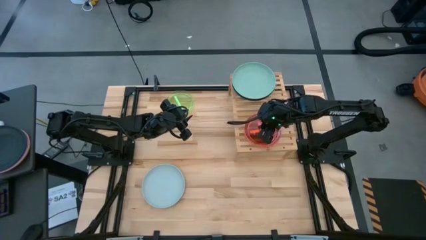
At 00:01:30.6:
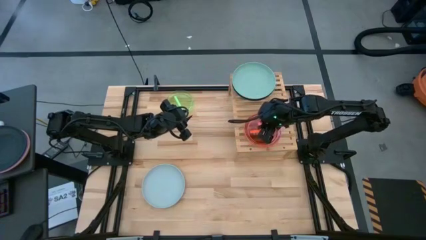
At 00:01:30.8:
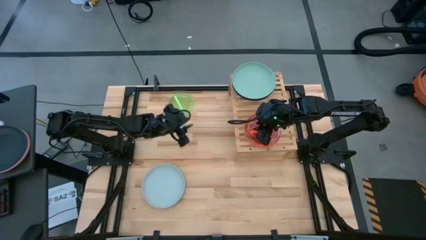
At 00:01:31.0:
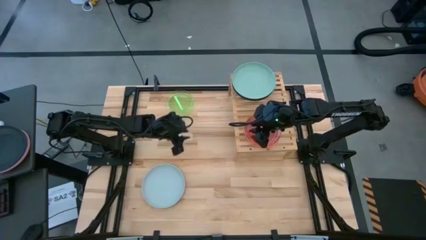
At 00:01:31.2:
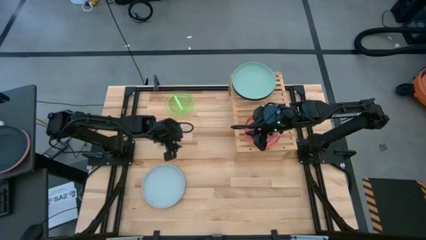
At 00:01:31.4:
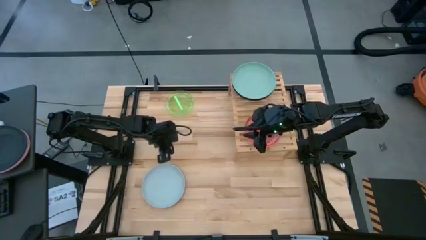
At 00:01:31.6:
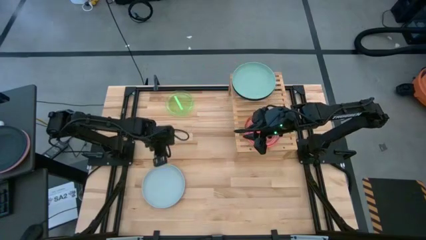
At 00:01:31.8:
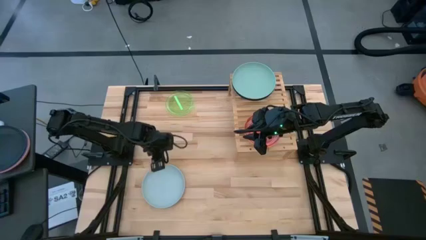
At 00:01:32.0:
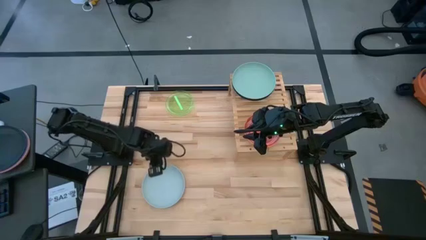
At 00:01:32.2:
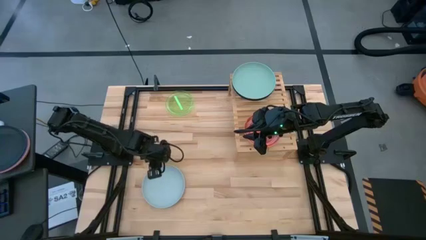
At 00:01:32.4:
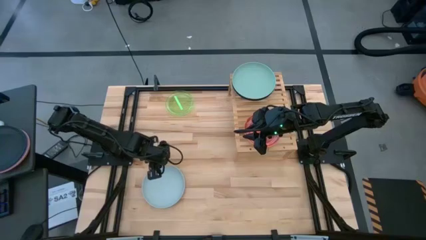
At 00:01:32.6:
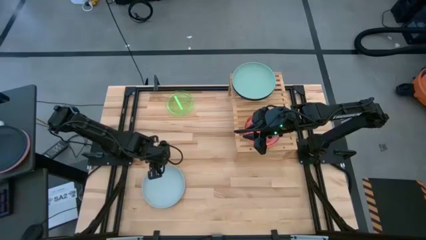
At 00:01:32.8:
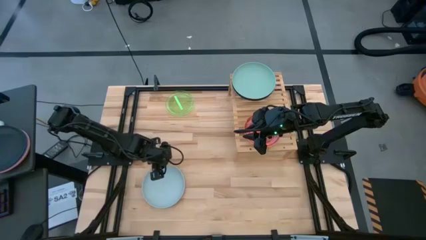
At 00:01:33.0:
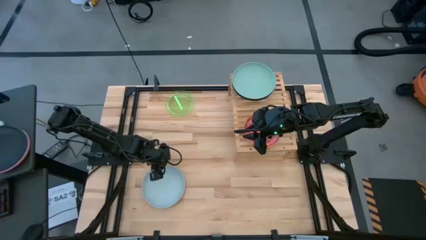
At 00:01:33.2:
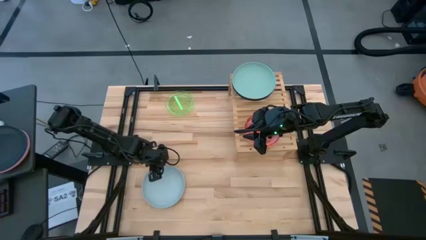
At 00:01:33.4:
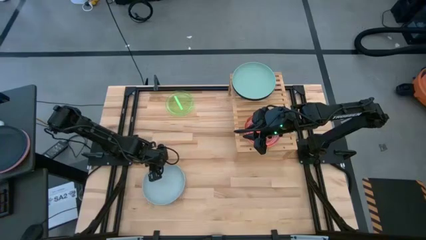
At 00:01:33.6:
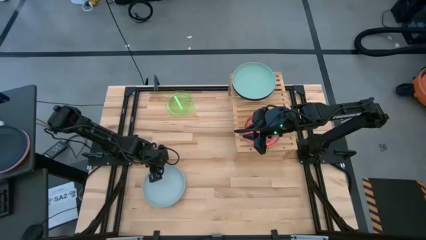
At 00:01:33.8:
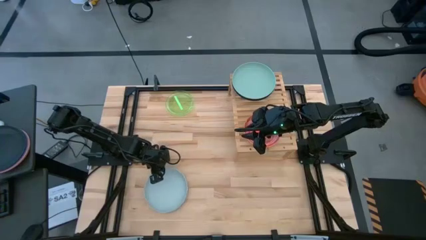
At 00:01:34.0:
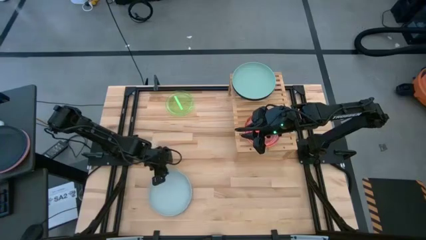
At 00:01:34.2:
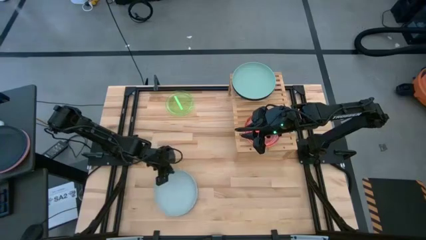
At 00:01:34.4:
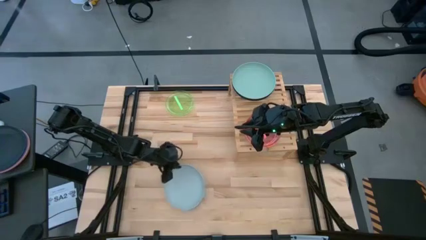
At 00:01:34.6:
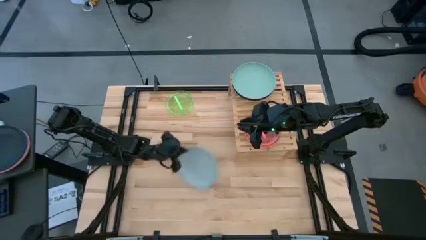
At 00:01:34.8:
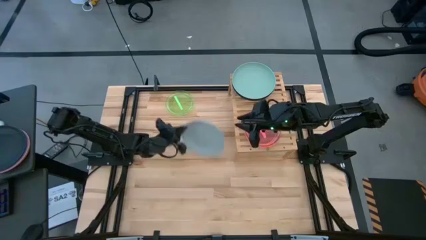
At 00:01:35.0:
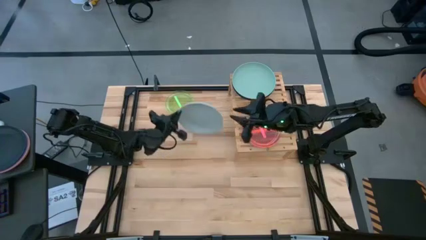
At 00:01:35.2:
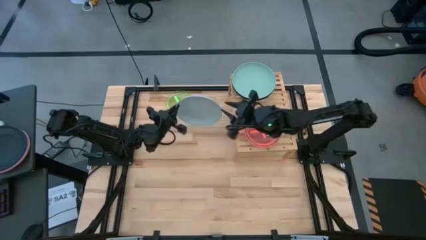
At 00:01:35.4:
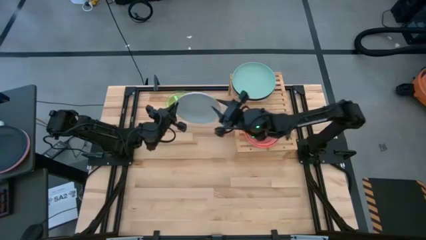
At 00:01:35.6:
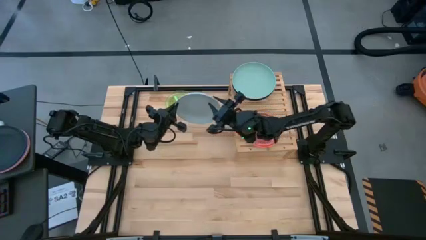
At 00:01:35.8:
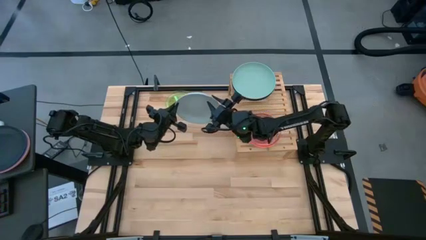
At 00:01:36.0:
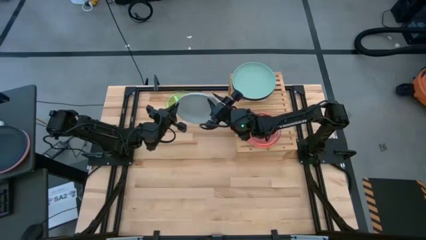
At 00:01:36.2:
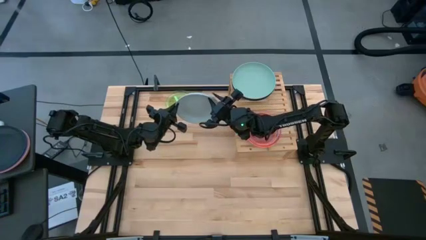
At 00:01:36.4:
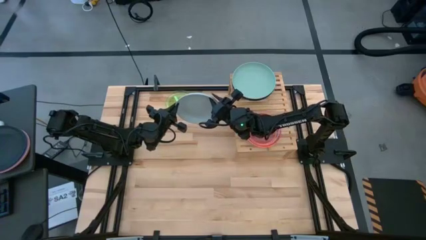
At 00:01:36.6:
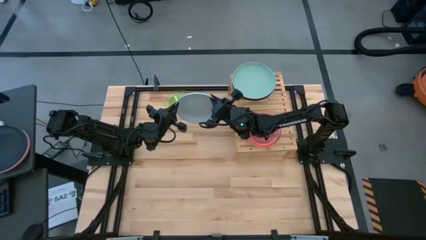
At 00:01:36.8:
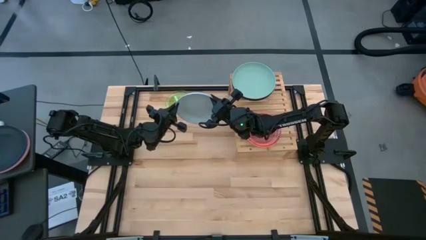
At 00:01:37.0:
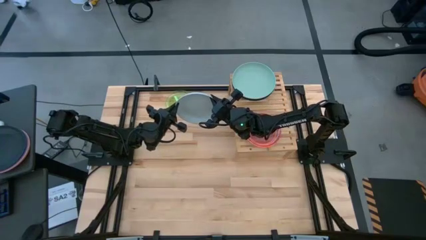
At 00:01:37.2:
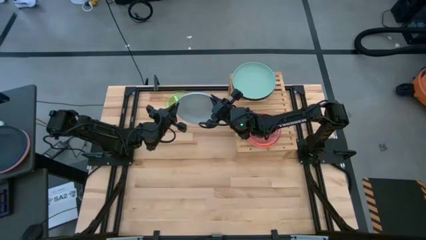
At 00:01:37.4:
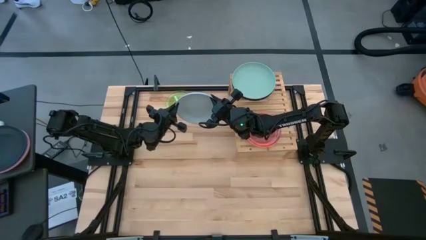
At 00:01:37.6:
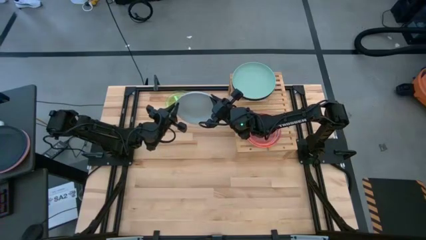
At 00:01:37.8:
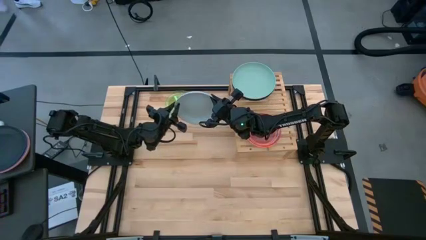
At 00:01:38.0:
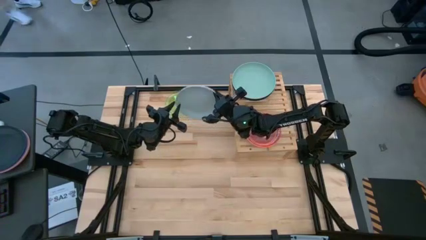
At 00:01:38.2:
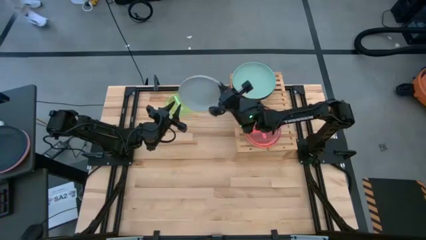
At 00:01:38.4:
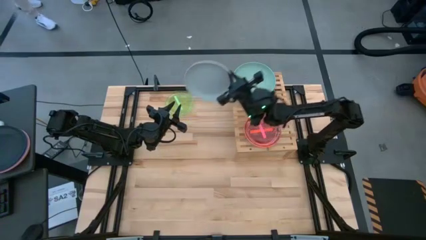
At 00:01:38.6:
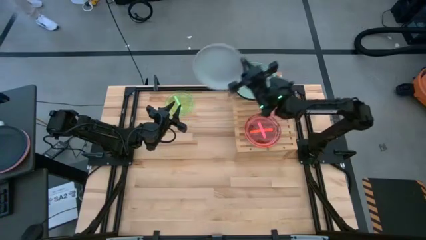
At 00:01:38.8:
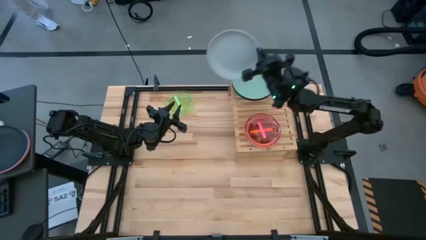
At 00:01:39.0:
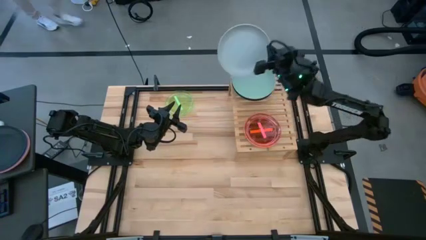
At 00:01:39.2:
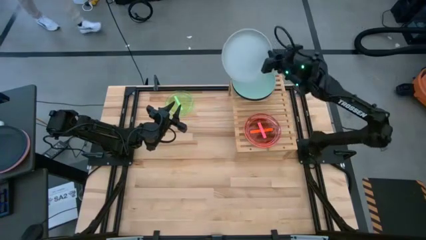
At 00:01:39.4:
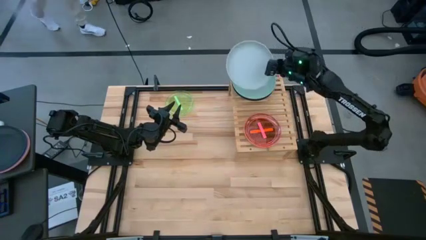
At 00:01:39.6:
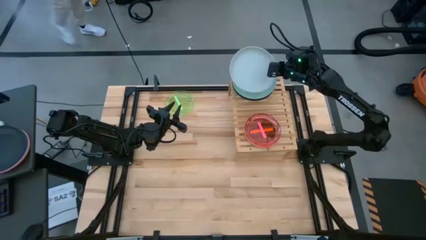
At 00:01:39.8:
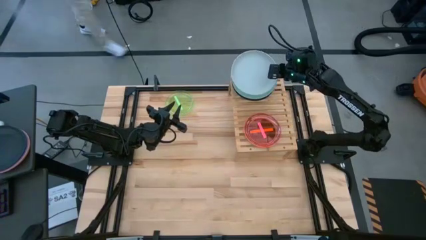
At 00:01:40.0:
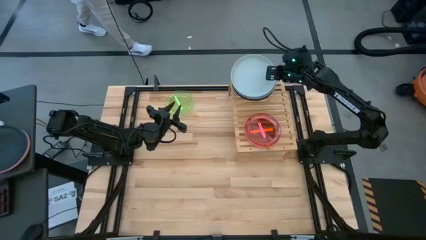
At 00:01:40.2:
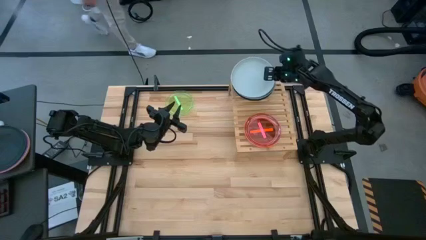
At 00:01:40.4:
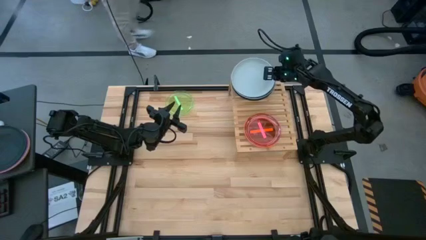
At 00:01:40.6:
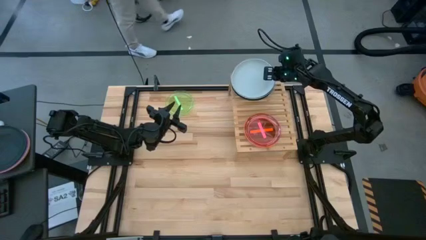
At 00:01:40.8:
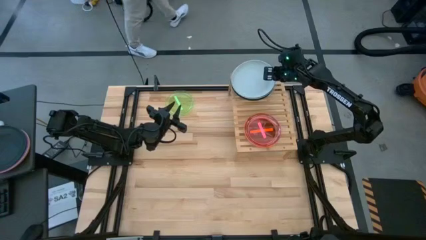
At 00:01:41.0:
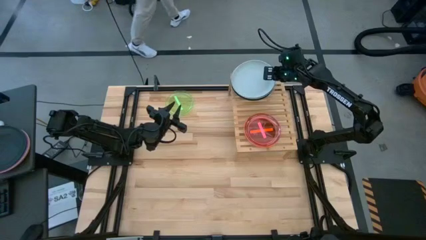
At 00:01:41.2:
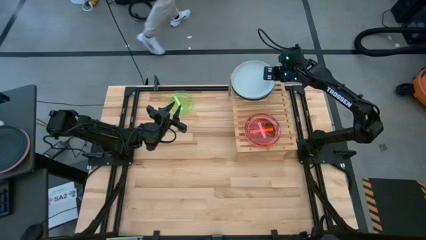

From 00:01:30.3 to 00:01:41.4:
Task: Place and stack plates onto a shelf
Stack the blue plate on top of the green plate on the shelf
